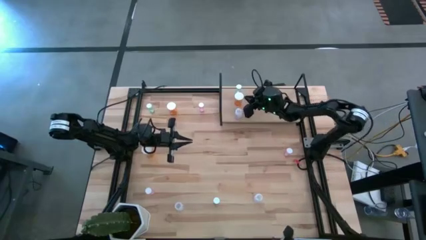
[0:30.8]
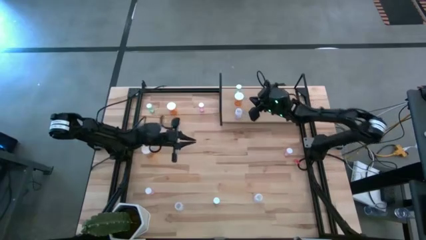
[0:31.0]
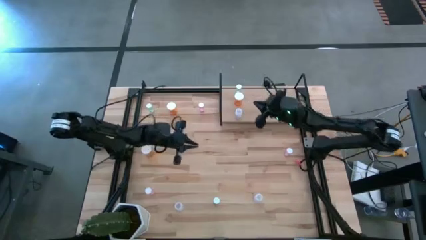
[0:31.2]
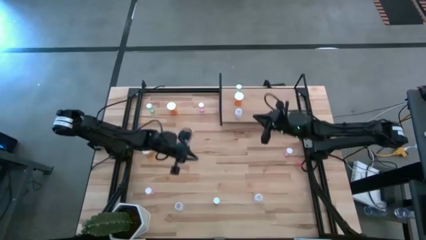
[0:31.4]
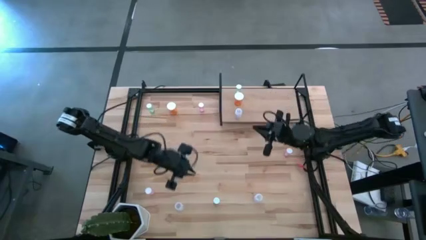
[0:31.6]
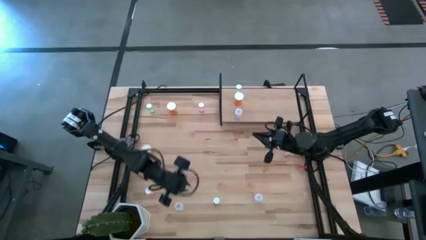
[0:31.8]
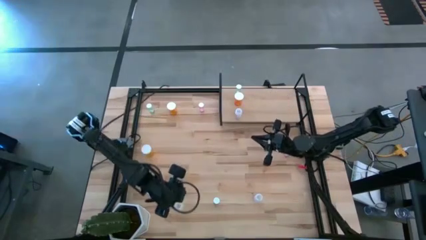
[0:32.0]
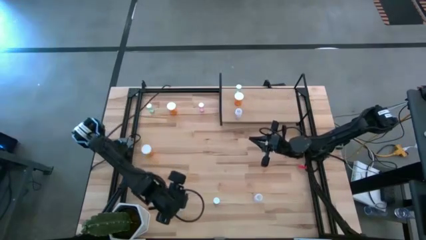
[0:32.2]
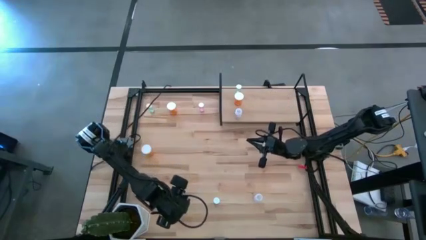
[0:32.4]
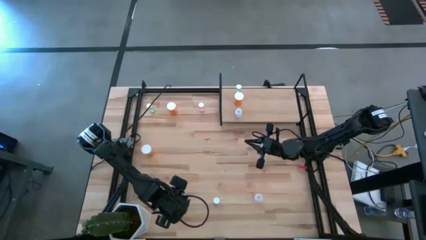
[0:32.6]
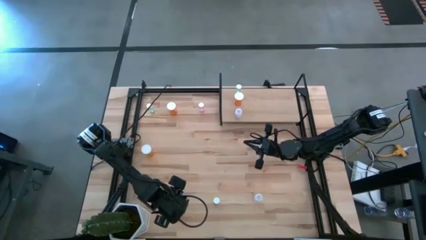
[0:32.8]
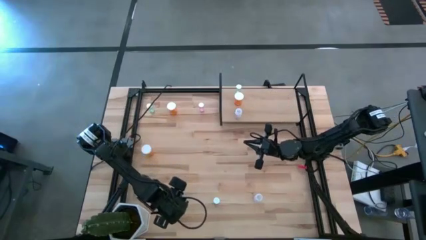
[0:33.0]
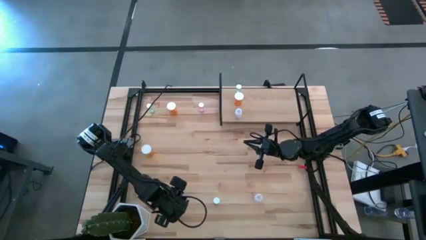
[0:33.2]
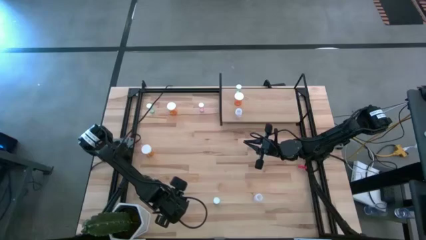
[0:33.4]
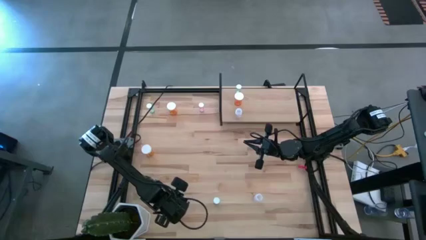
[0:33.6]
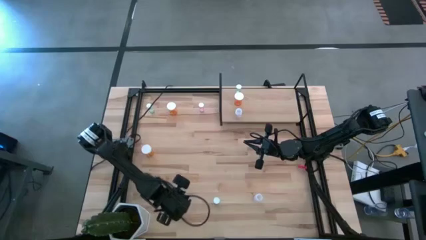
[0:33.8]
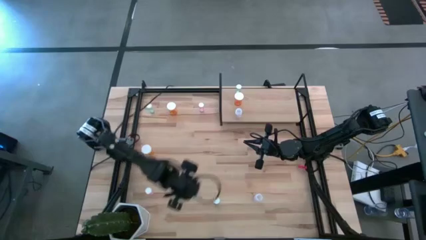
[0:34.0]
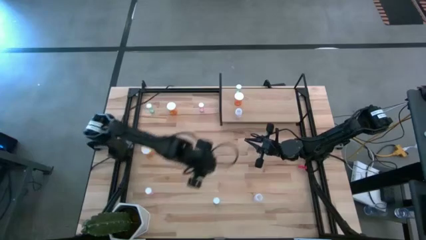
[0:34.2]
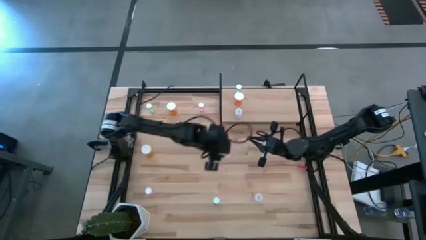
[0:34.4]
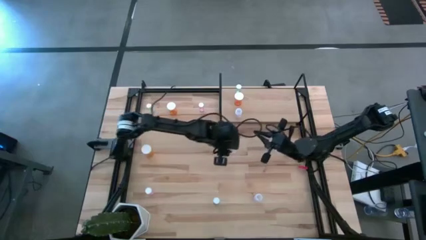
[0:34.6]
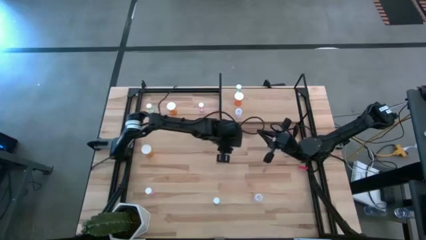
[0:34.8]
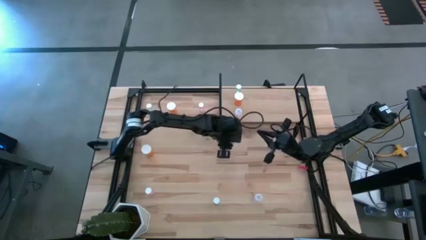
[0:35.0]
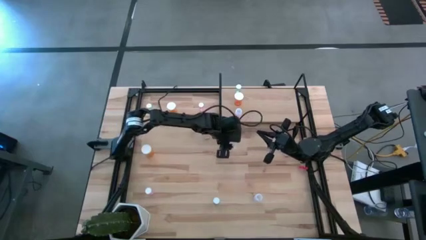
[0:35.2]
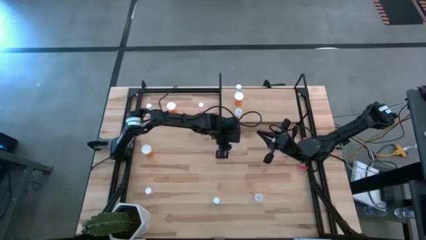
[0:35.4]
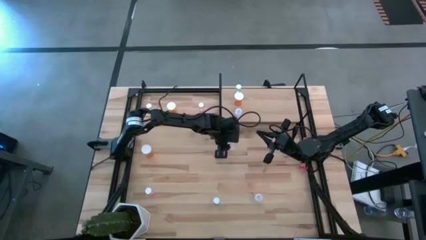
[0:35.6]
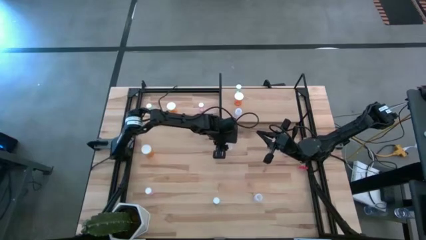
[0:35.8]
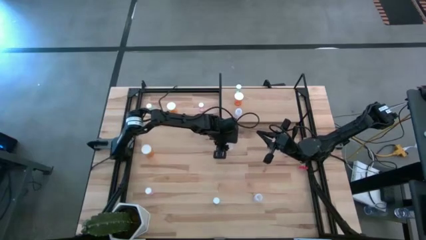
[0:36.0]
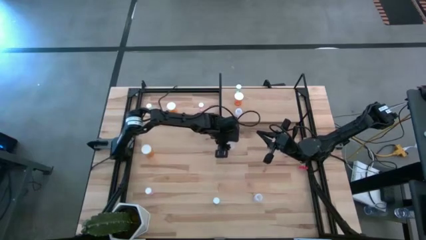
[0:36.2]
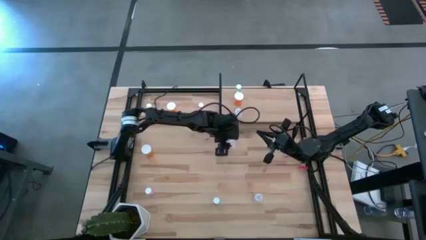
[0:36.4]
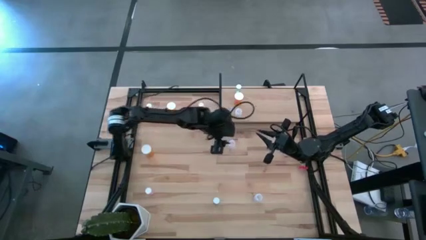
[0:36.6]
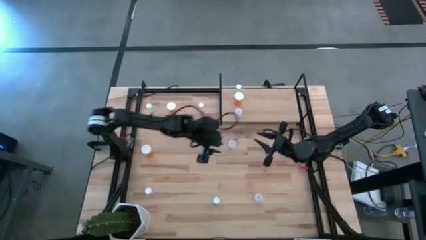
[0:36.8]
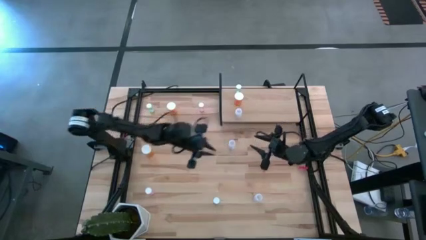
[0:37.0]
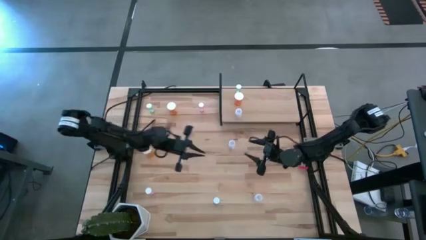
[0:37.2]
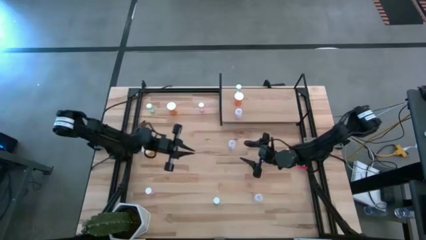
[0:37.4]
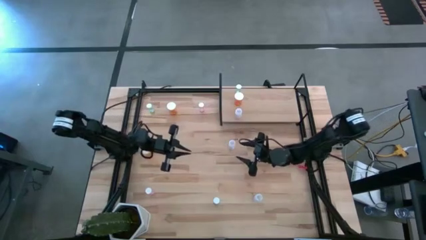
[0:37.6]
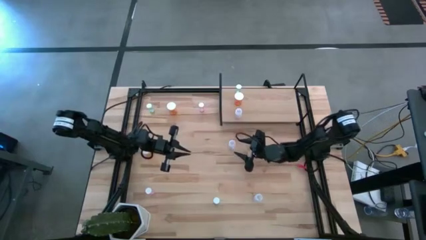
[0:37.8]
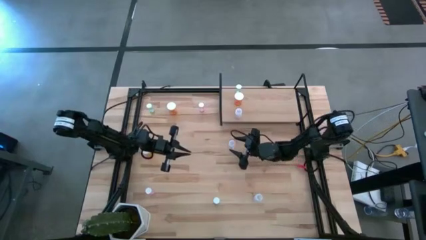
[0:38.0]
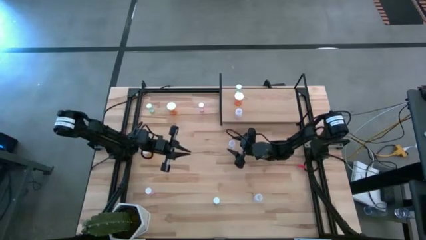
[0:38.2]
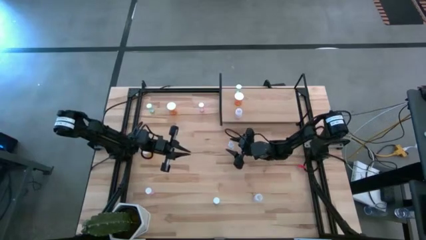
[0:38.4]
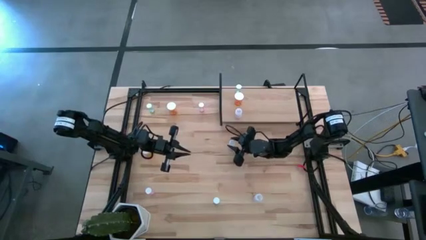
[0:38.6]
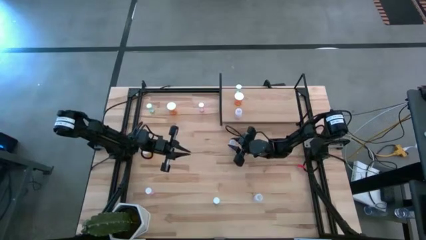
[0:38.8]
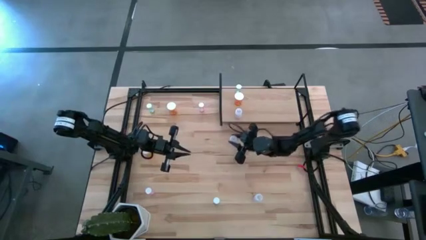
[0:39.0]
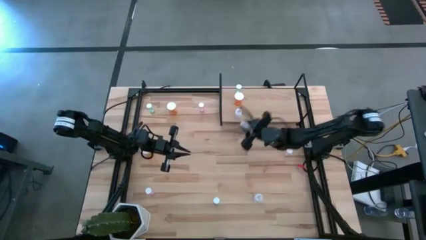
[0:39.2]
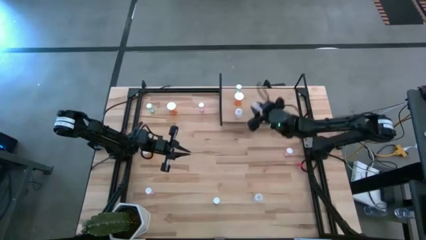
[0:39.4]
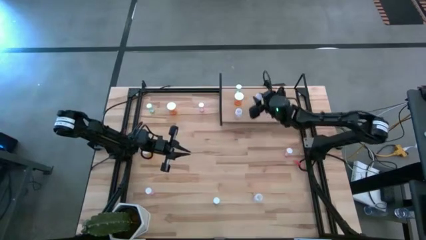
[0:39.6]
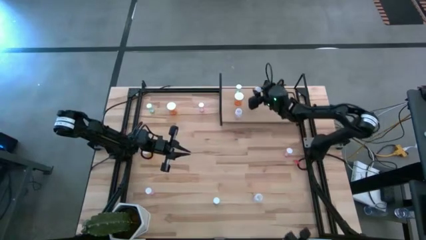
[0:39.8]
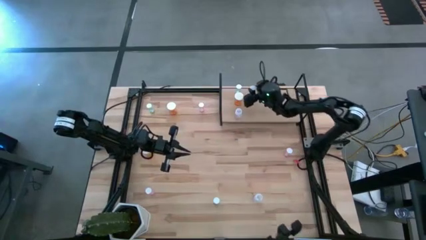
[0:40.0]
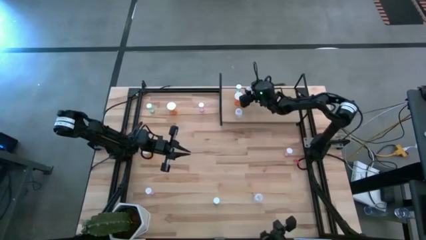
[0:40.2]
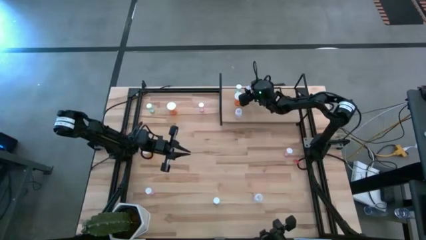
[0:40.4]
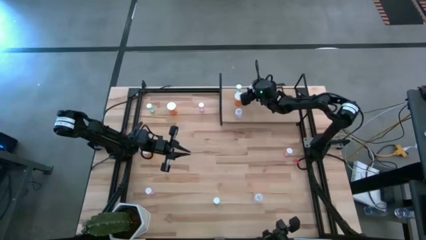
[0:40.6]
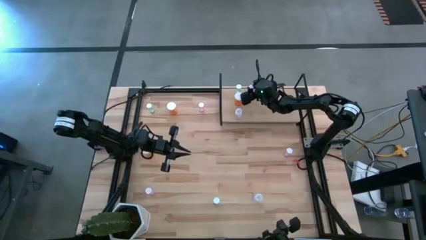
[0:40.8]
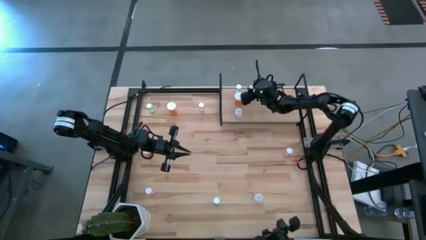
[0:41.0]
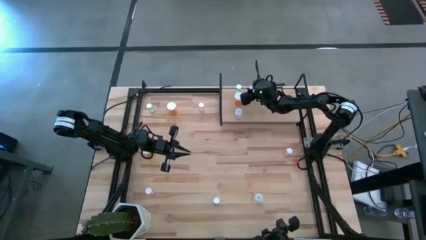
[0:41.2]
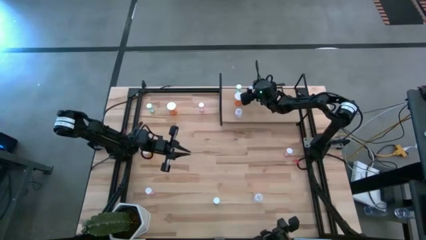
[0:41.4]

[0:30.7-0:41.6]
Task: Pick and place medicine bottles onto shelf by color
Put the left transparent pill bottle on the shelf

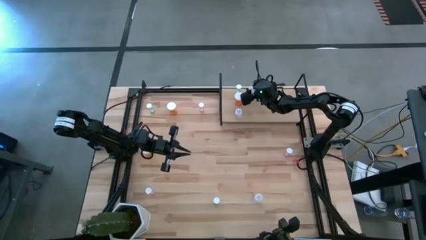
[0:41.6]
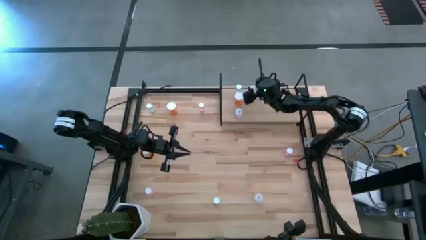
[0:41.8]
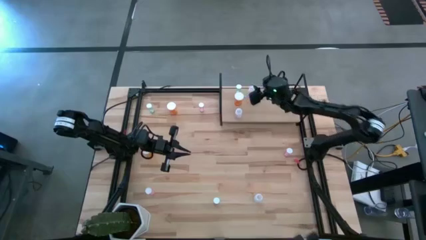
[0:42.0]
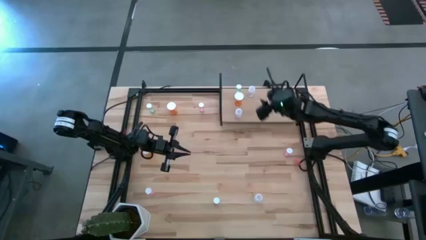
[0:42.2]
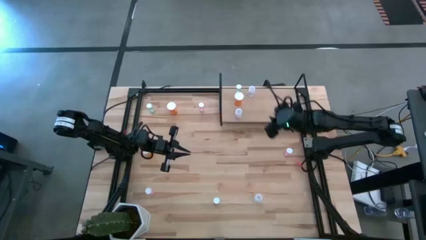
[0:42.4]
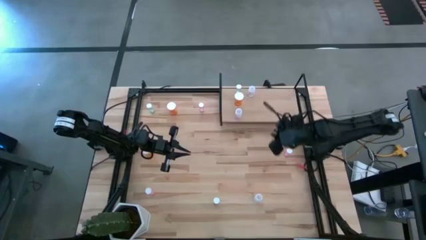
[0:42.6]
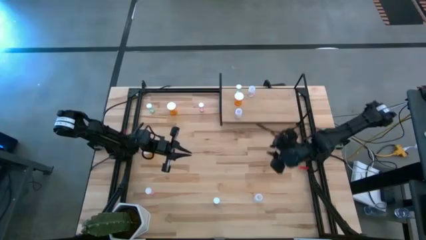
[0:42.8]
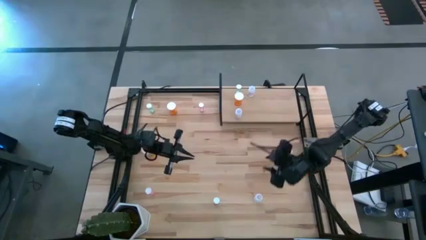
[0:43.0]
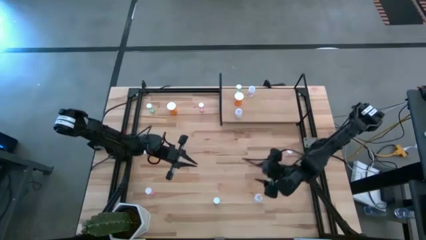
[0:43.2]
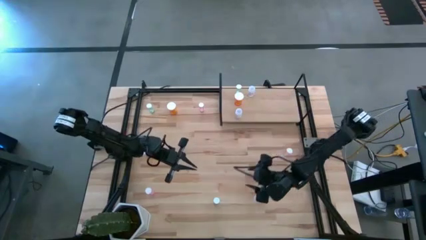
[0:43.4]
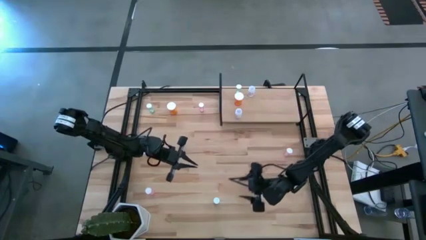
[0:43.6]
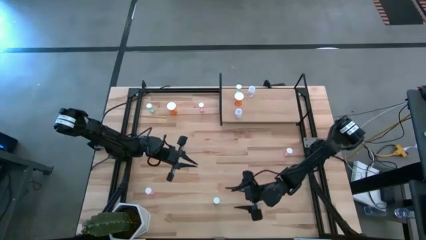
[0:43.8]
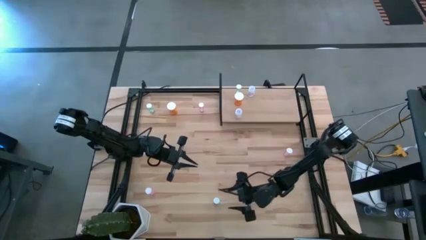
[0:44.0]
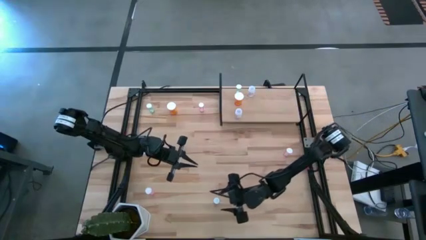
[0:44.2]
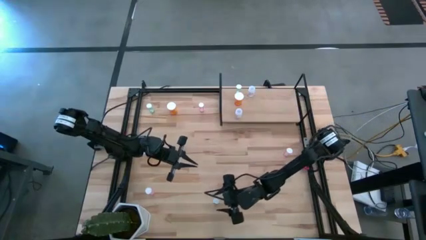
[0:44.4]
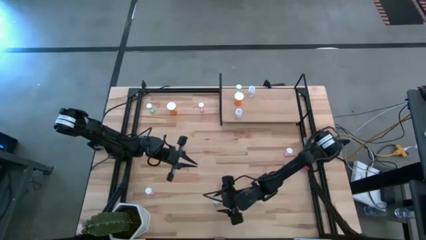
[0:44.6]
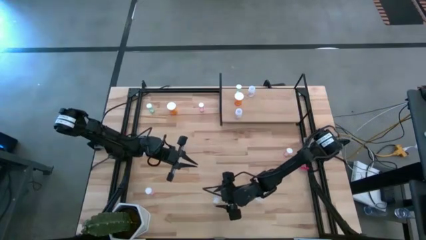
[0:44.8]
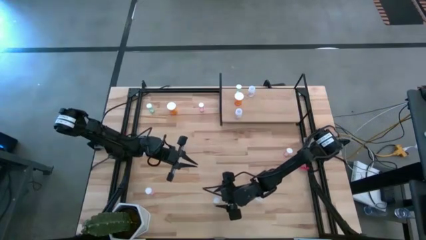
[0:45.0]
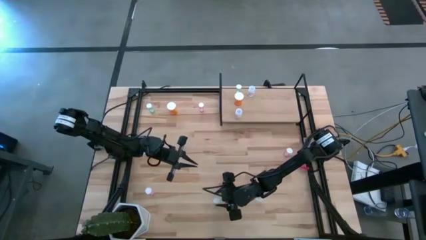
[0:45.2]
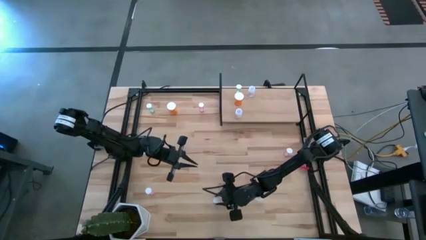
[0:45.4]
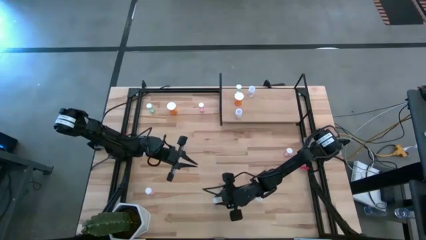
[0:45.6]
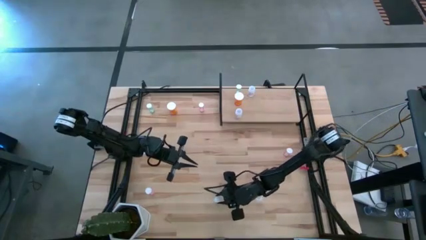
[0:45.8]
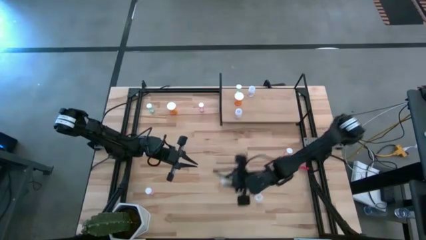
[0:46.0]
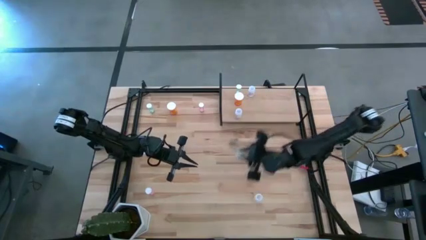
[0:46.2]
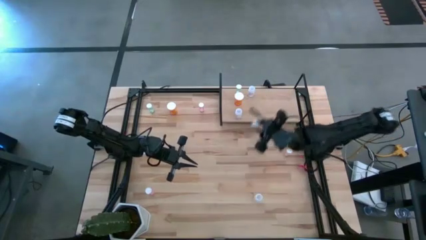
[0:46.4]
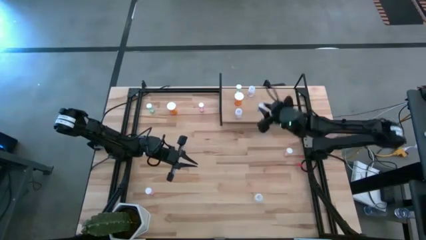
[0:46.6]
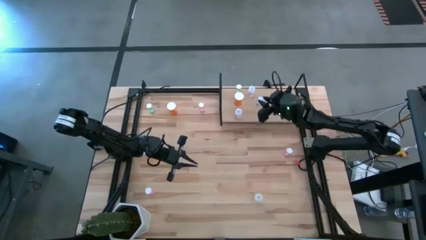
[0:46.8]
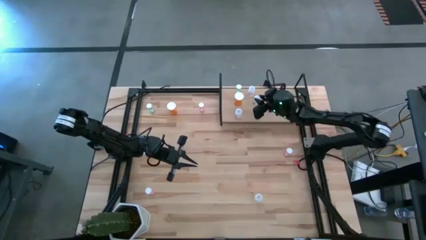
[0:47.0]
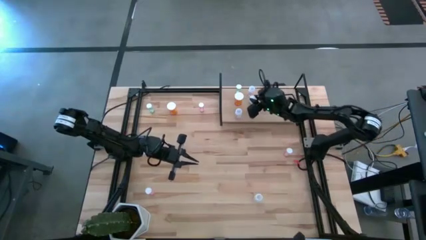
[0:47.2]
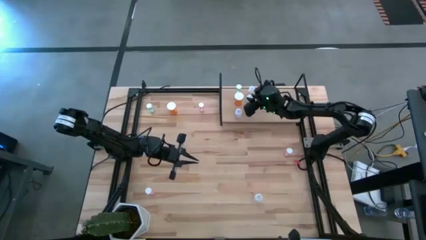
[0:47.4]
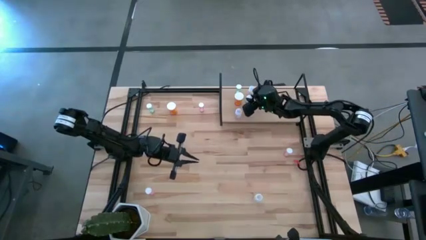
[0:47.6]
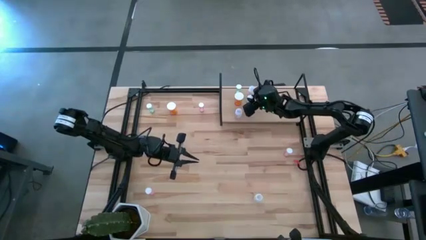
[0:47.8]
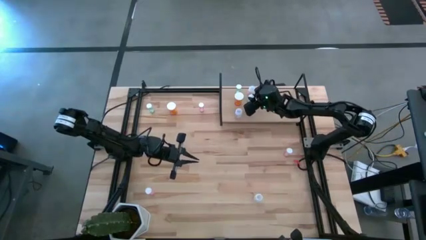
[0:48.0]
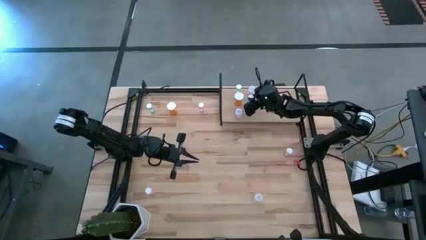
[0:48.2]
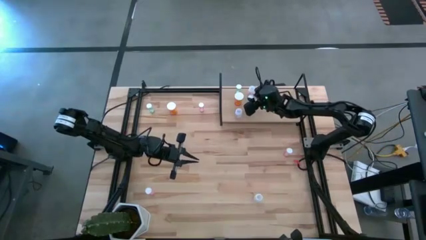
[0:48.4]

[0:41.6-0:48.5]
Put the bottom blue pill bottle on the shelf
